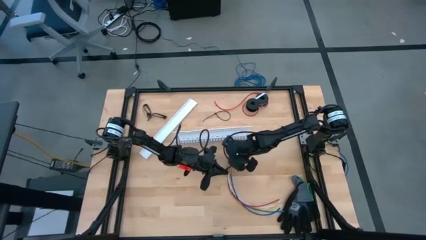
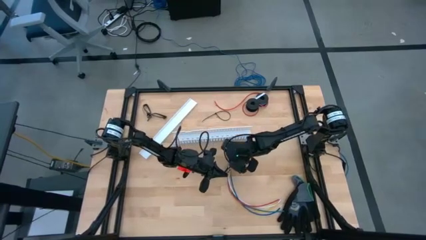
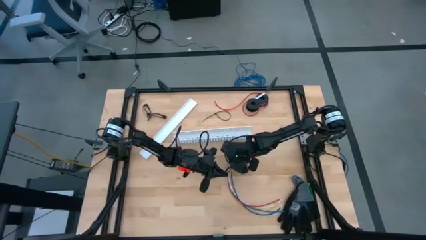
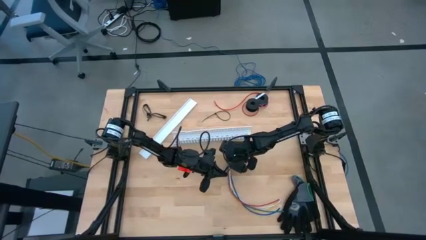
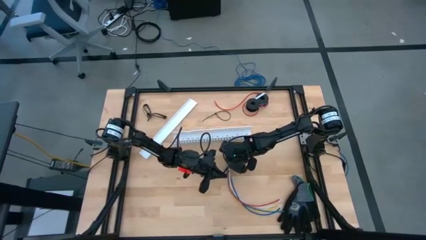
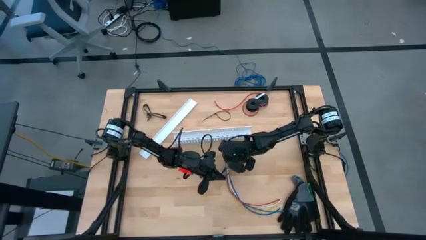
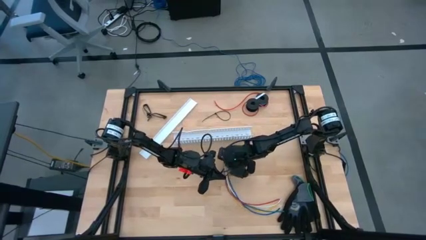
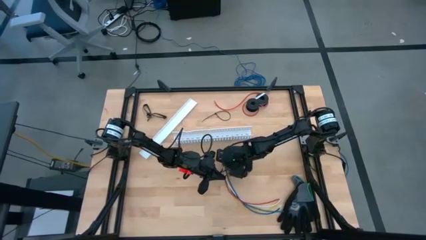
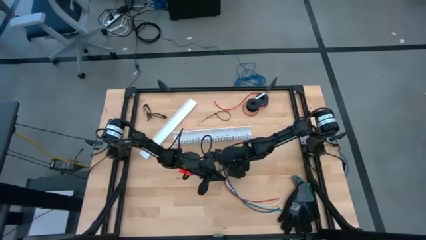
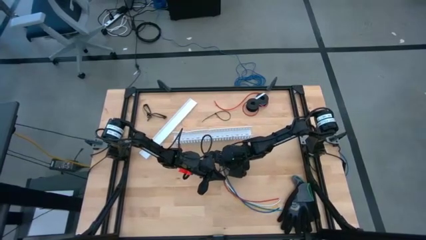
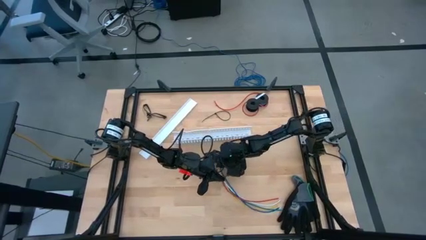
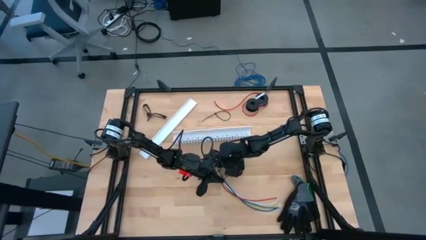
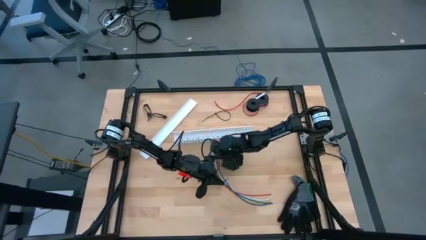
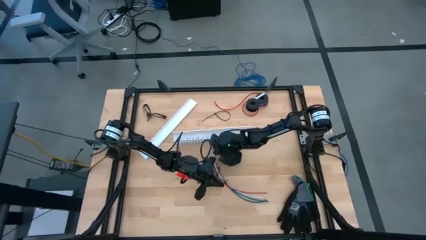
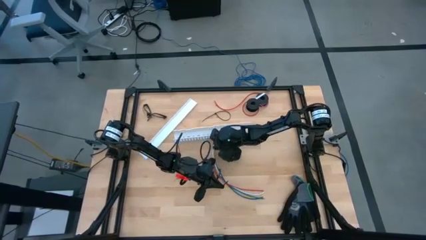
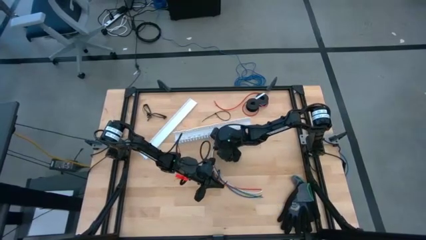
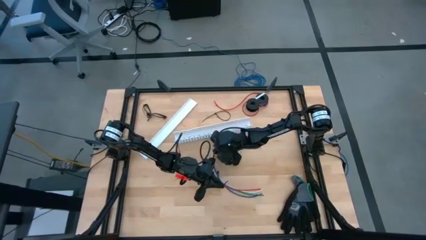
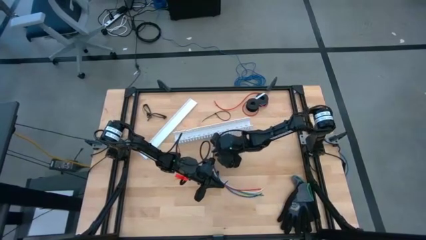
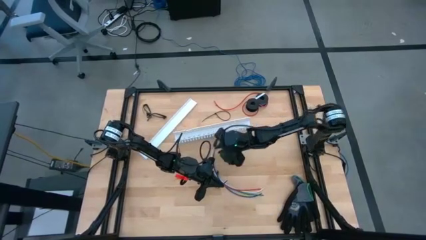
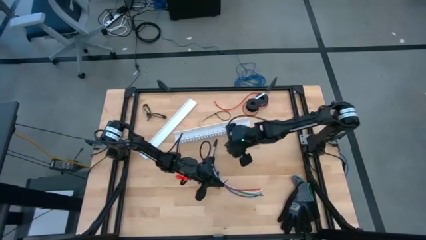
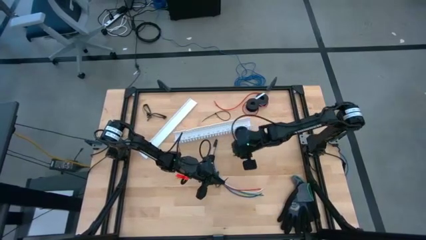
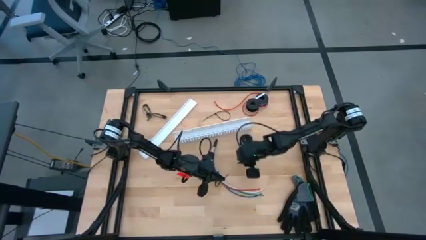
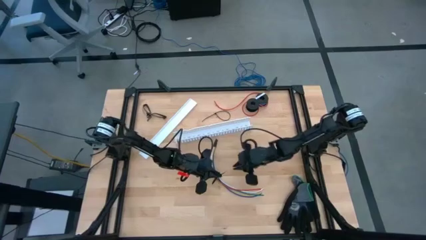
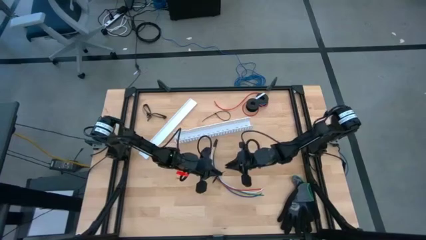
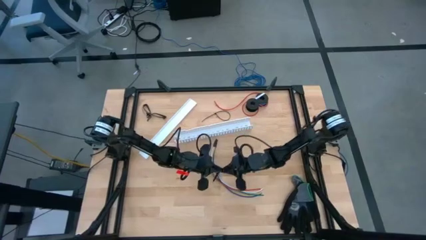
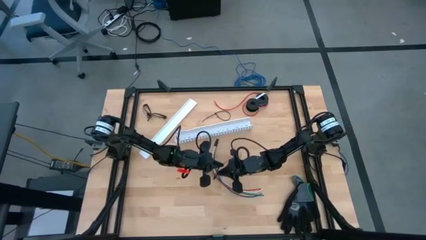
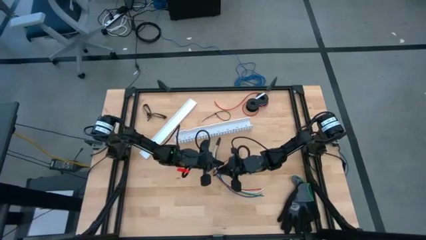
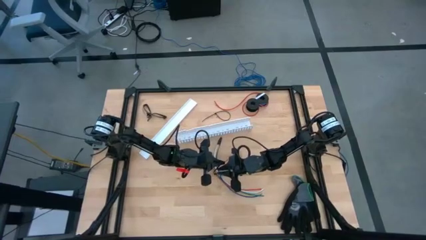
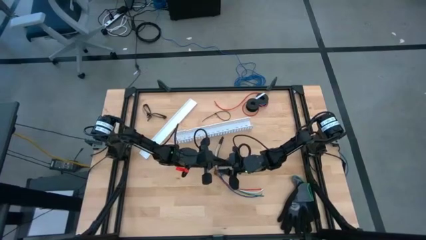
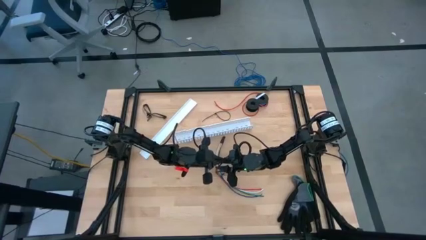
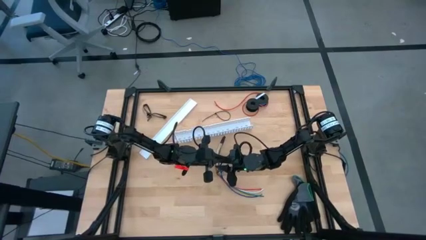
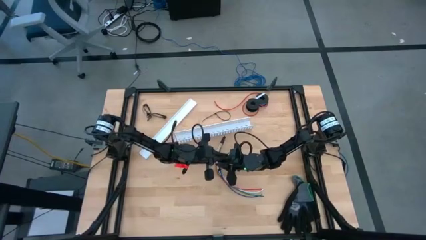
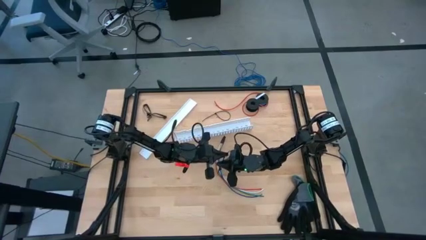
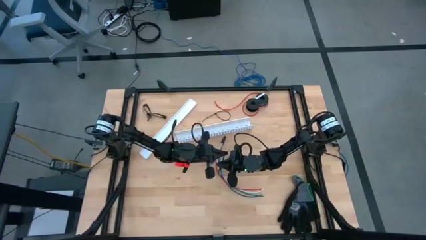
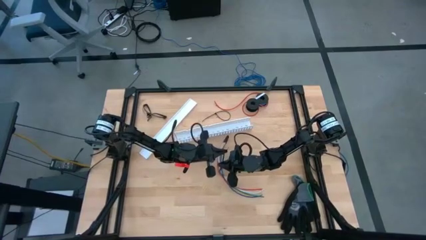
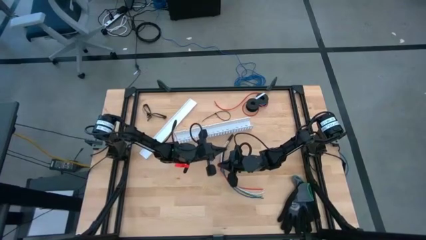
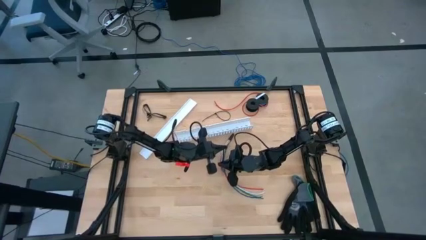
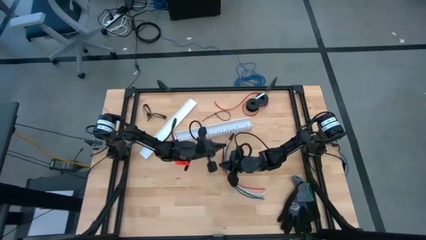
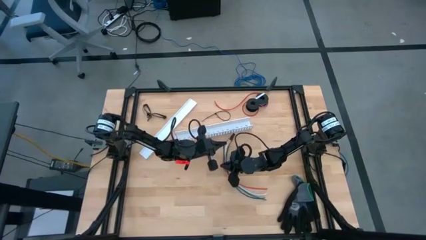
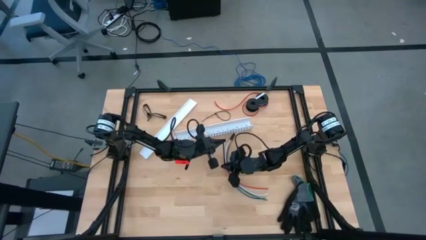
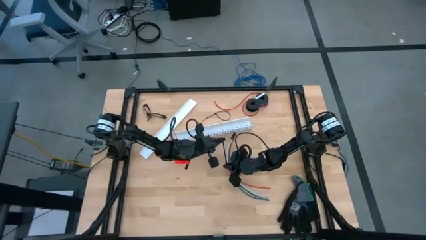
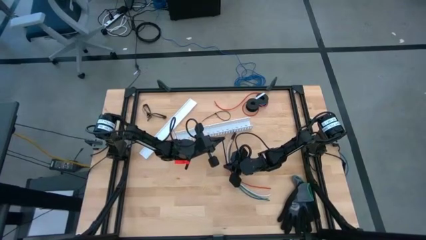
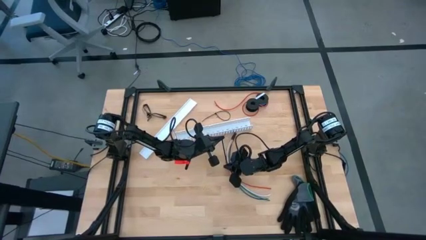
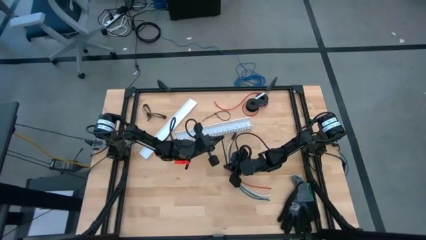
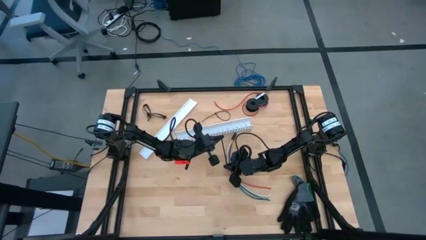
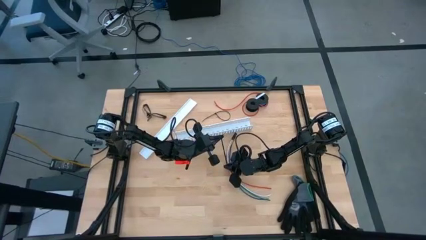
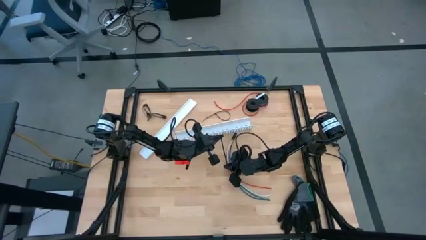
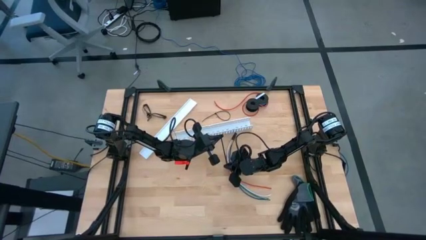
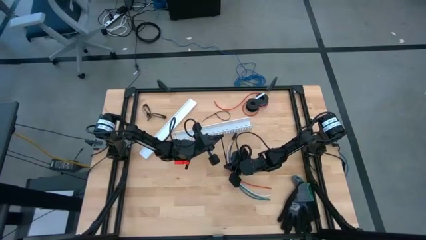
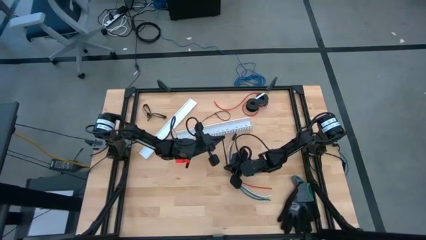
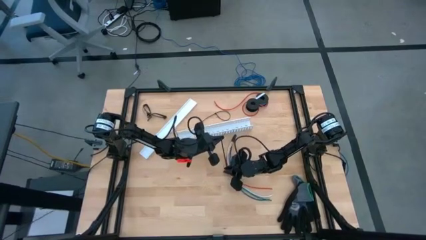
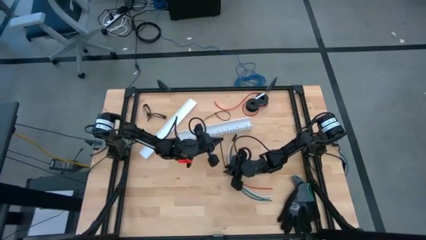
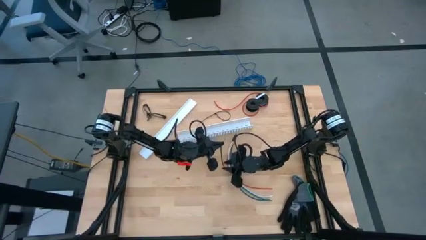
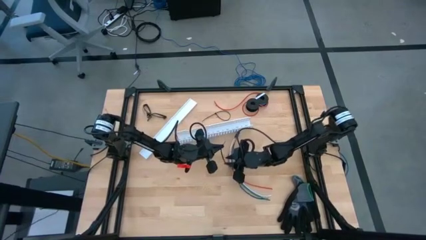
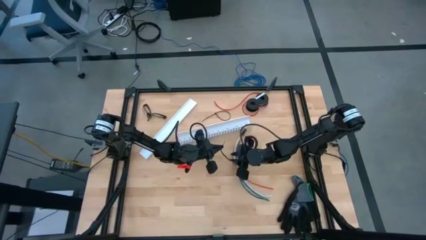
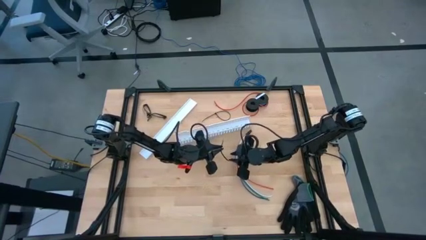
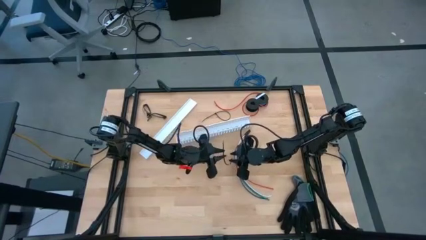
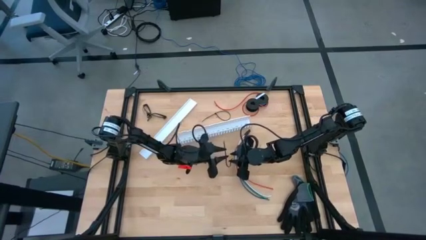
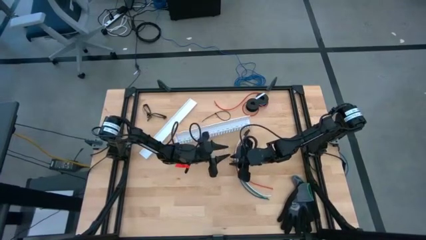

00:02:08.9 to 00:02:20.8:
Task: Ziptie cables
Wrap the cables together using the left black zip tie

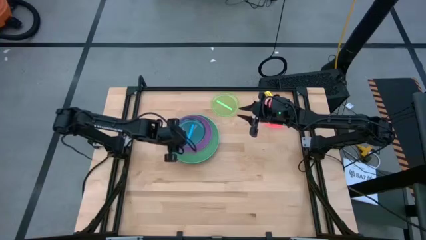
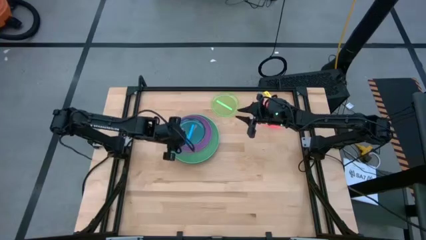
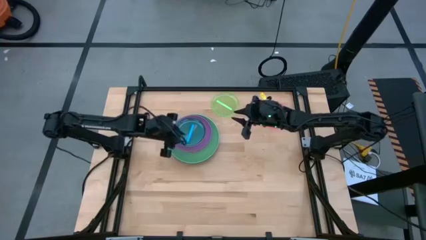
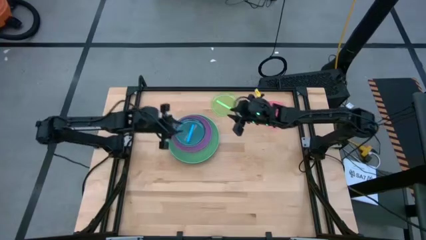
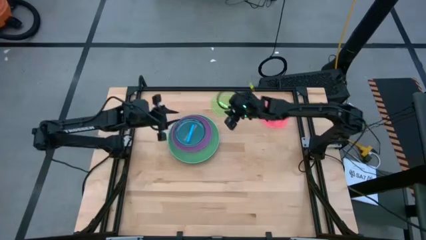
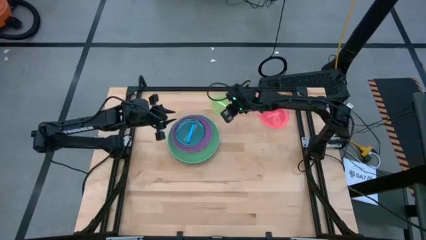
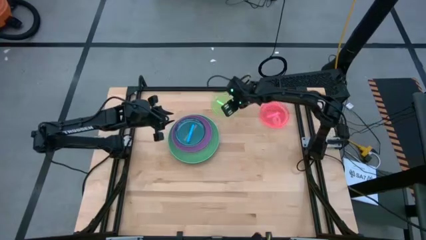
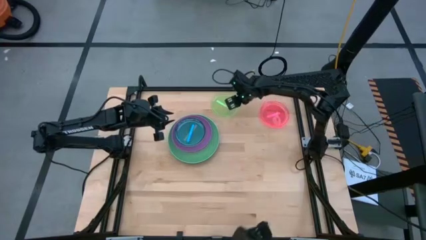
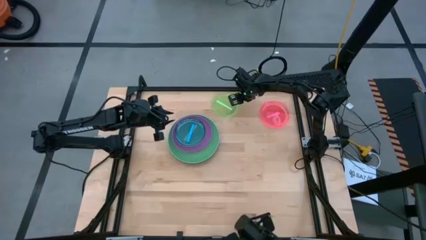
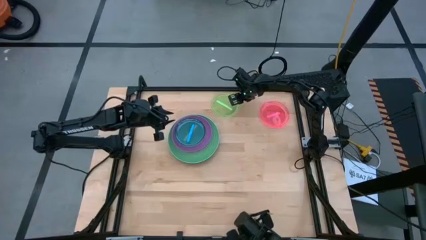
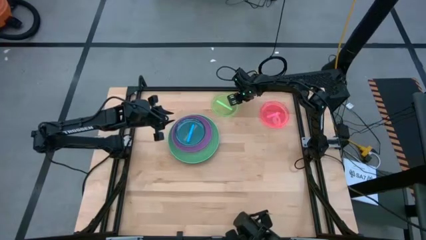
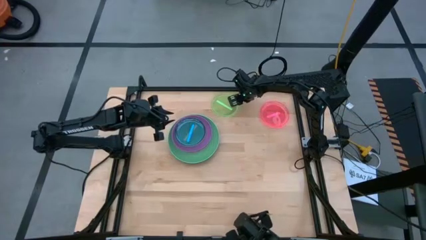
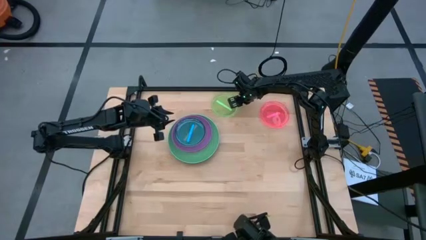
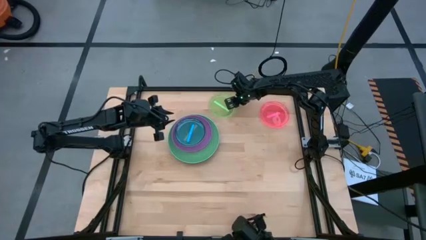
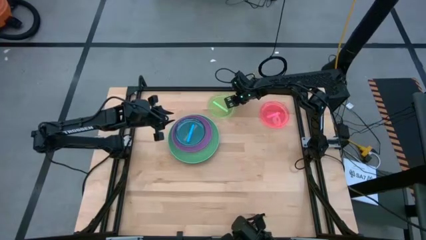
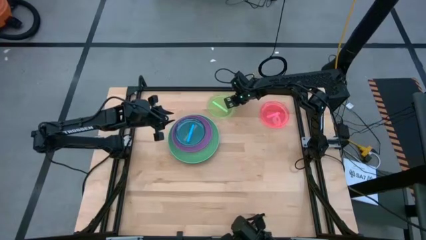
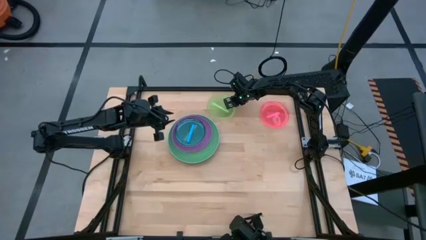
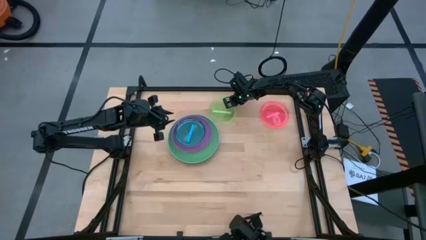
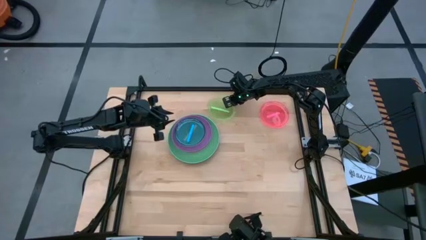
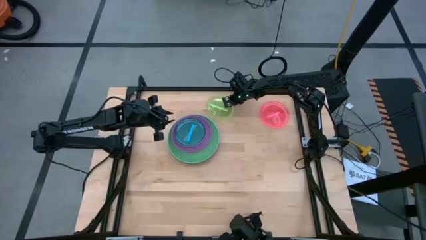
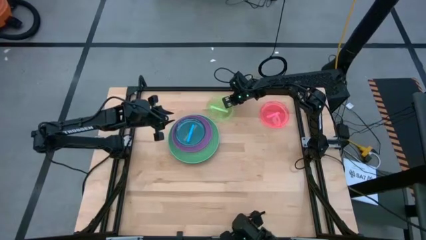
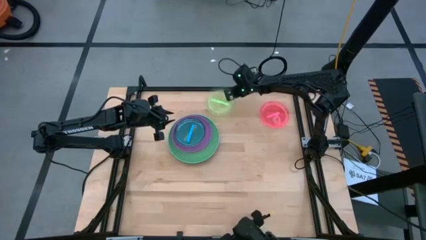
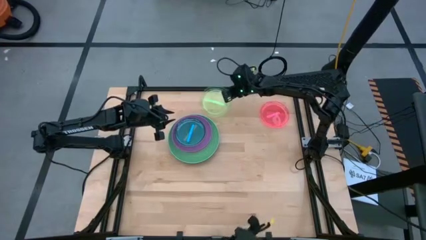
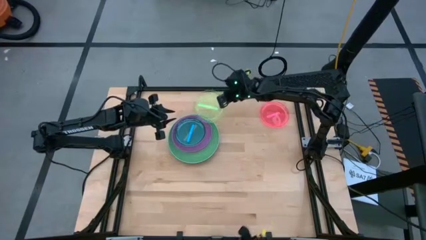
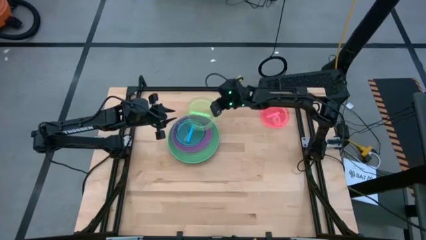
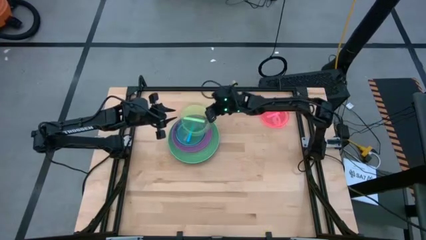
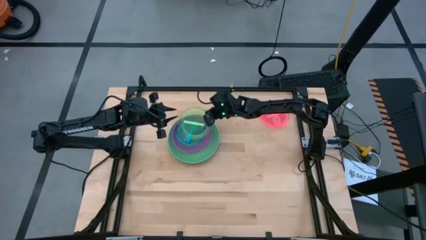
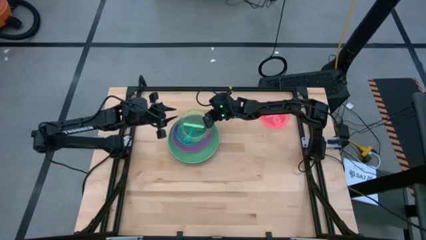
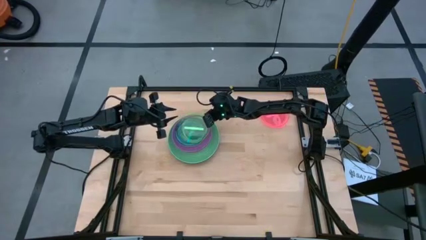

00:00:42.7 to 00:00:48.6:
Task: Stack plastic plates
Stack the transparent green plate on top of the transparent blue plate
